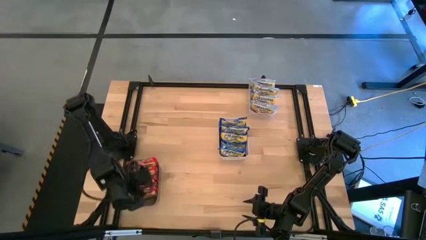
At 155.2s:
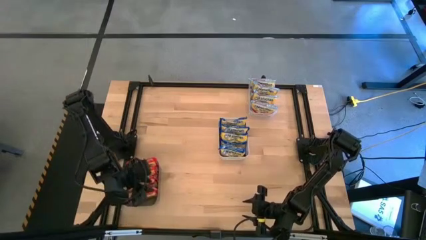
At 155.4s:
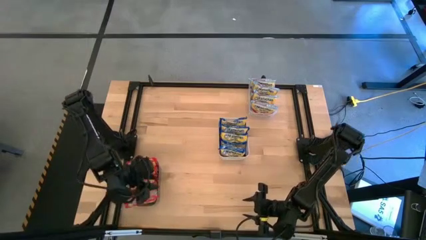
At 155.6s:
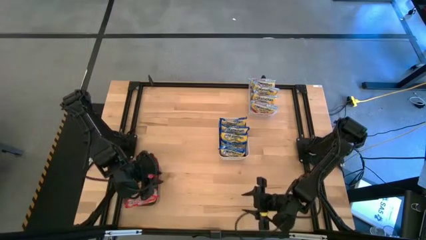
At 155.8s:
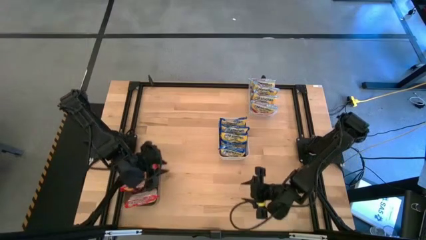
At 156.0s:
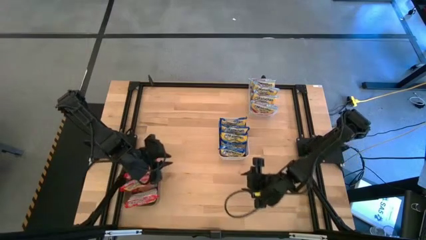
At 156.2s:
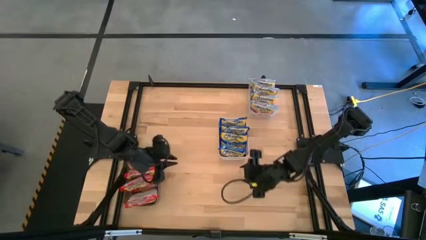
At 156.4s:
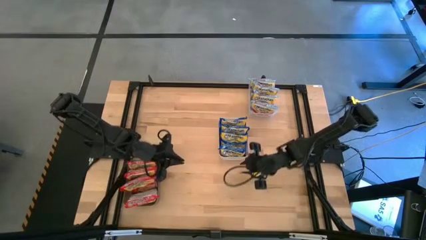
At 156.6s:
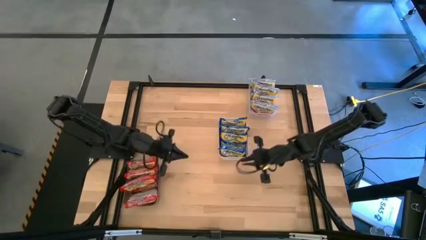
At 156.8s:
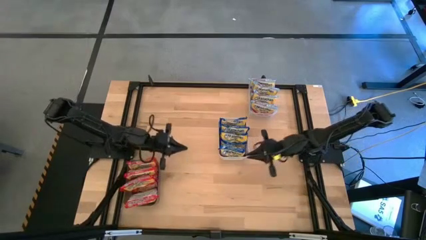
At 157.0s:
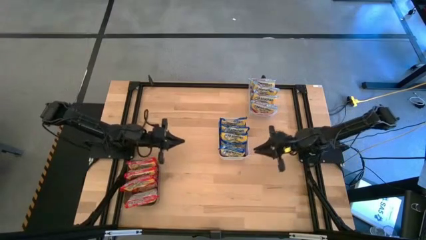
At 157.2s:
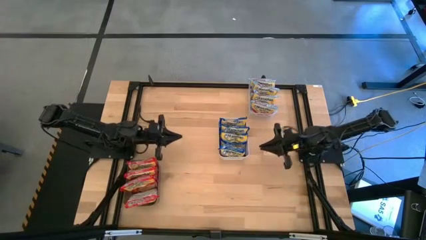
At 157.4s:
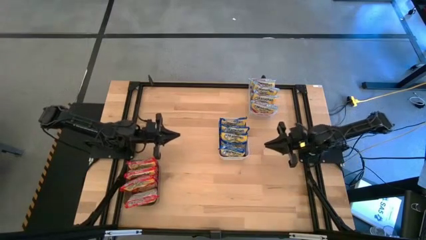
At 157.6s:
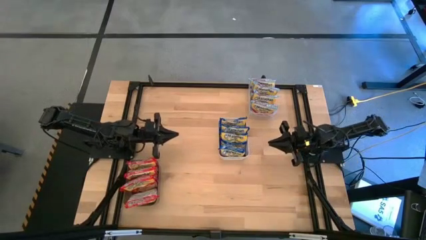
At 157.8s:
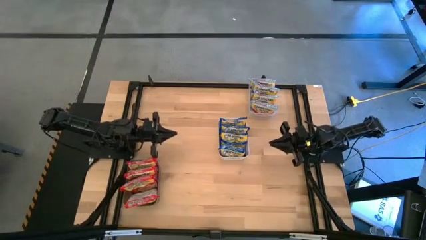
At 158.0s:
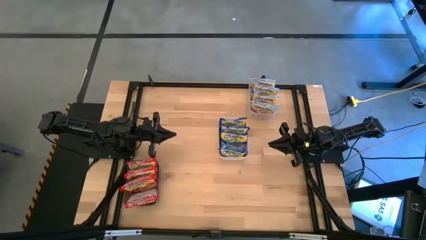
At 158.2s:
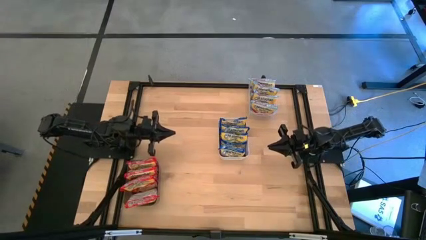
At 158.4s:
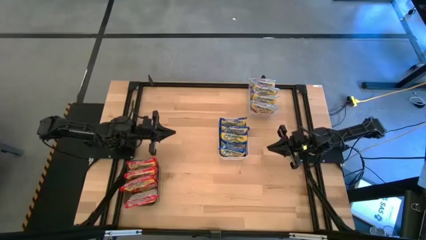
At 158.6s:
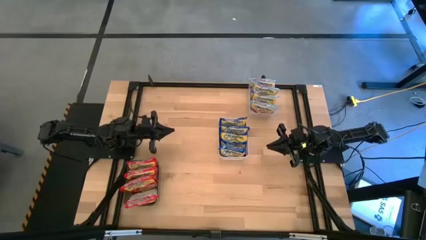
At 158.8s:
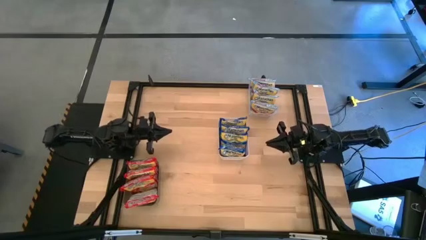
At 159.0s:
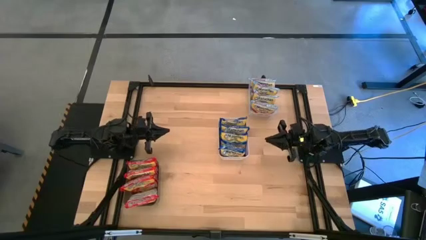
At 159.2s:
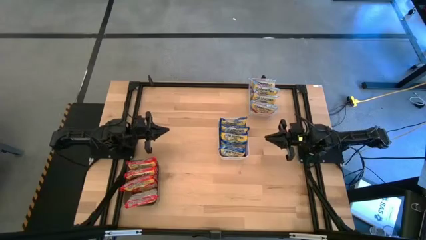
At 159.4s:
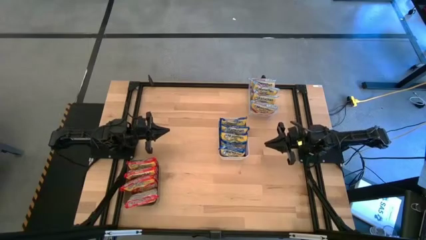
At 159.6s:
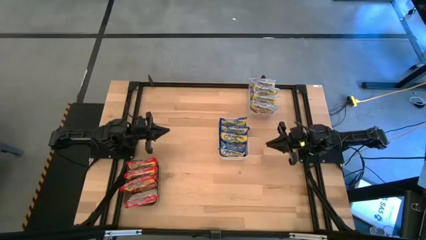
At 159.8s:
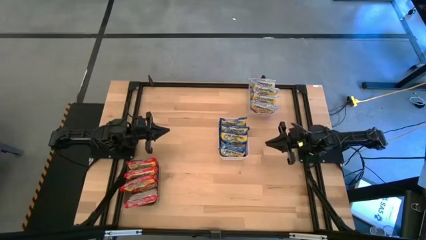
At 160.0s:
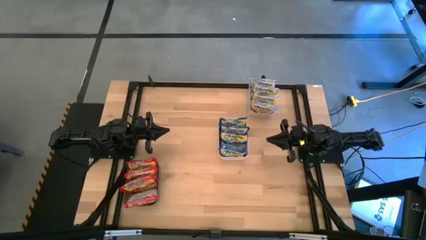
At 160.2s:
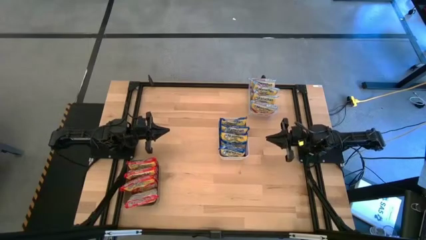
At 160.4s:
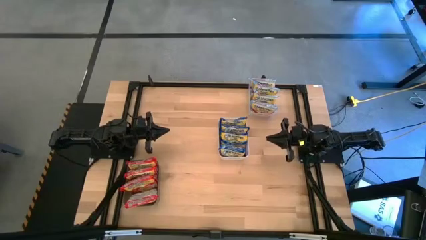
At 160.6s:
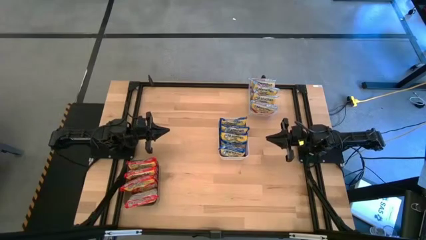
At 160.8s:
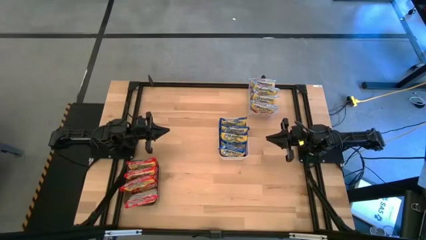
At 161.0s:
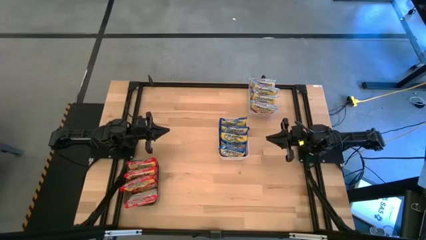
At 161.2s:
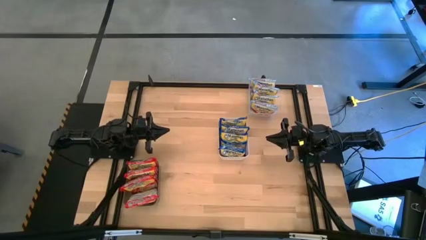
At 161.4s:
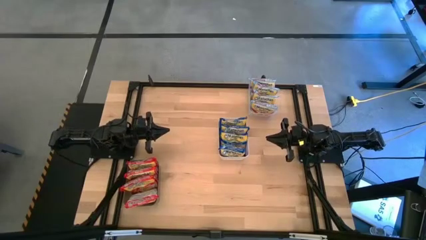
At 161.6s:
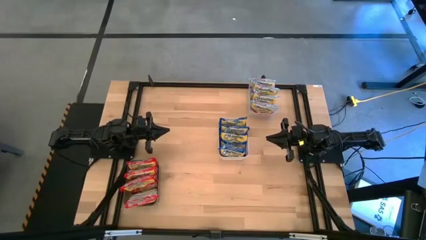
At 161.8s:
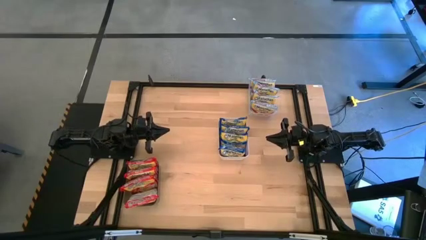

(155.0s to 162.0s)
Task: Sort Maruchan noodles
Return to Home Position

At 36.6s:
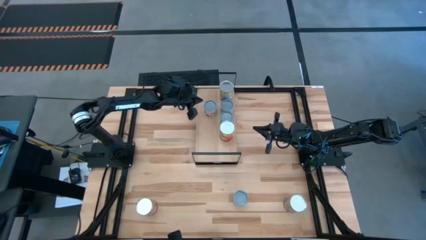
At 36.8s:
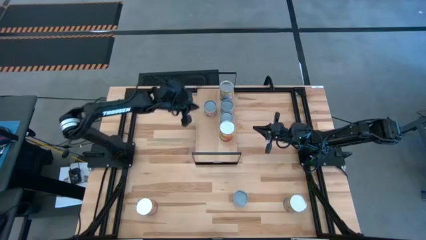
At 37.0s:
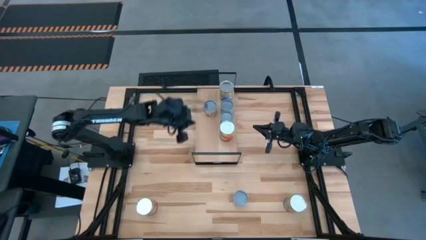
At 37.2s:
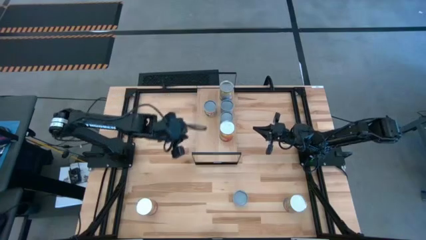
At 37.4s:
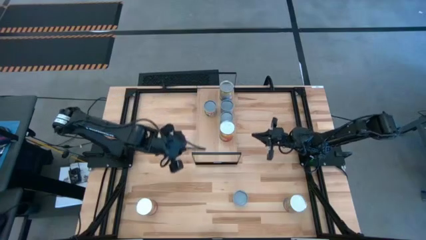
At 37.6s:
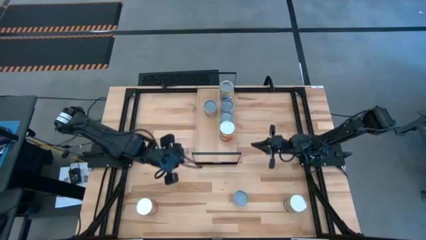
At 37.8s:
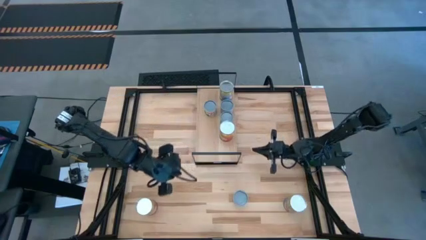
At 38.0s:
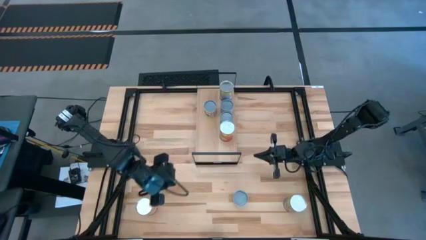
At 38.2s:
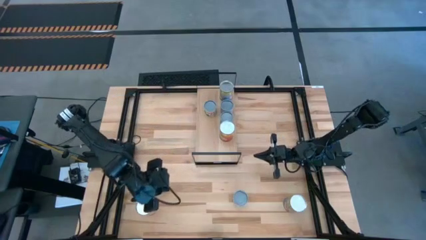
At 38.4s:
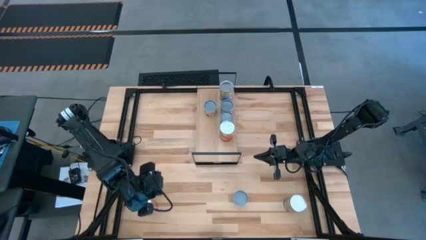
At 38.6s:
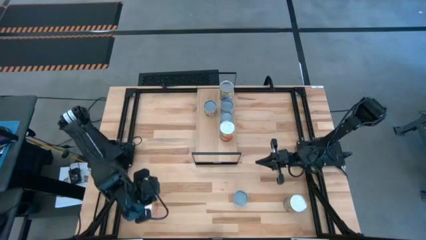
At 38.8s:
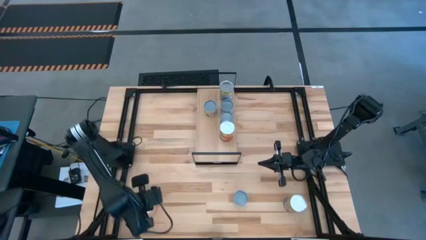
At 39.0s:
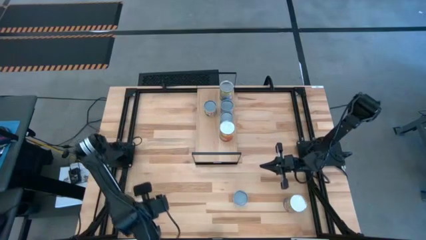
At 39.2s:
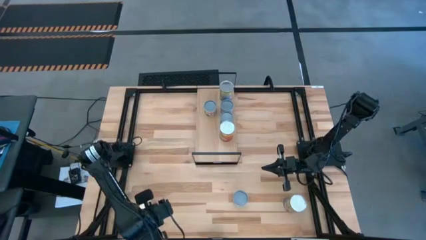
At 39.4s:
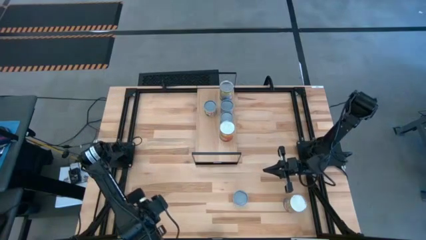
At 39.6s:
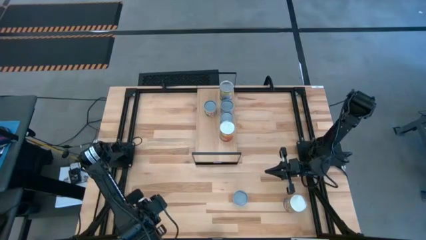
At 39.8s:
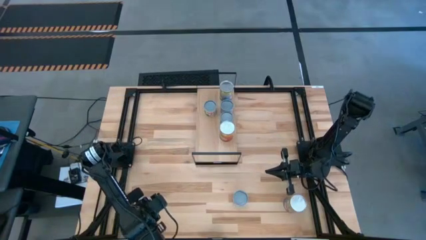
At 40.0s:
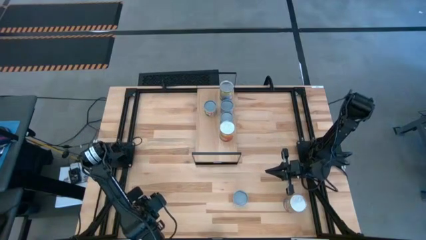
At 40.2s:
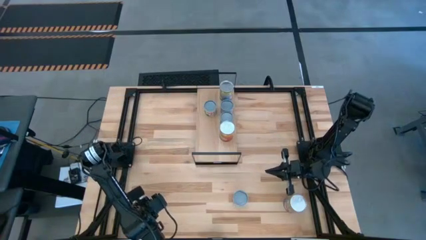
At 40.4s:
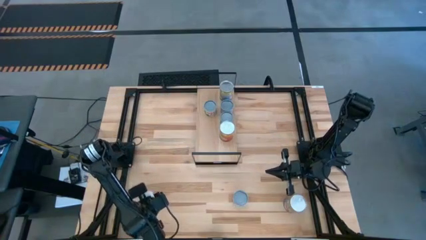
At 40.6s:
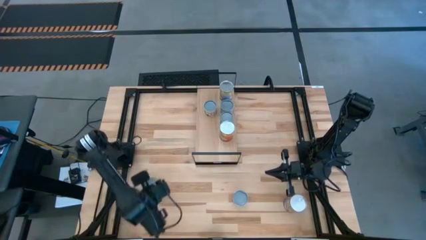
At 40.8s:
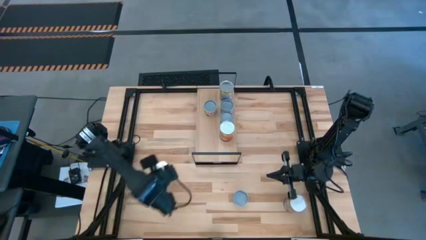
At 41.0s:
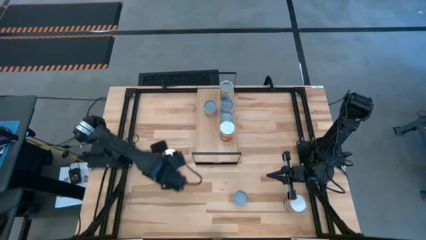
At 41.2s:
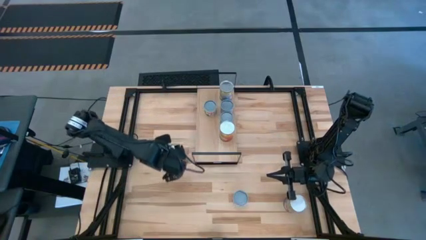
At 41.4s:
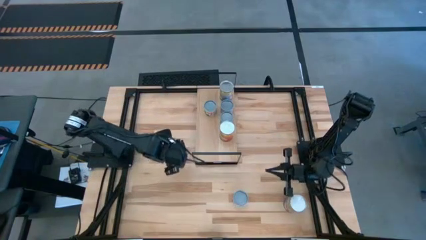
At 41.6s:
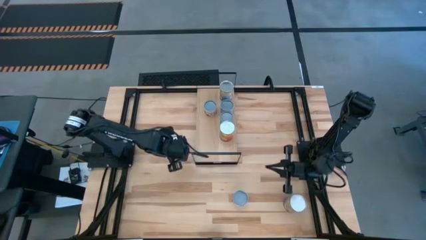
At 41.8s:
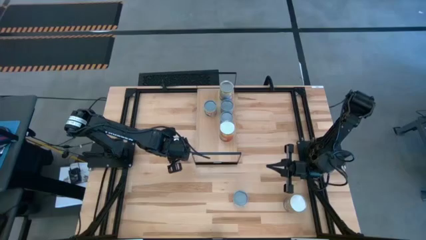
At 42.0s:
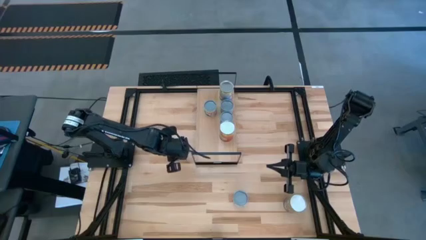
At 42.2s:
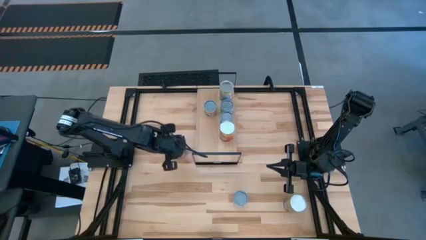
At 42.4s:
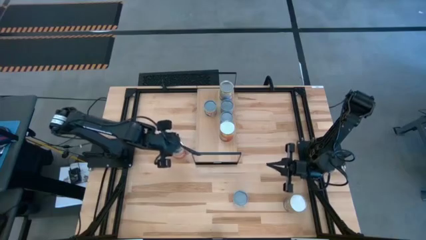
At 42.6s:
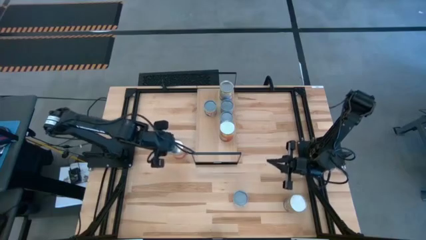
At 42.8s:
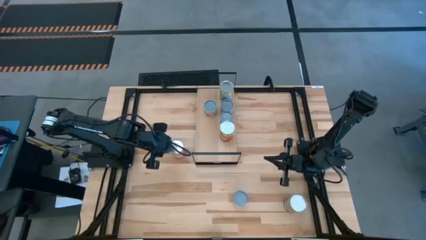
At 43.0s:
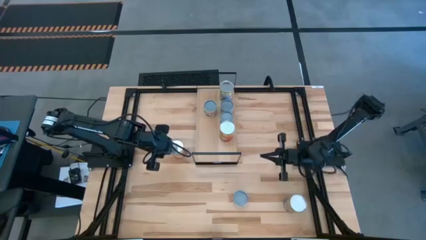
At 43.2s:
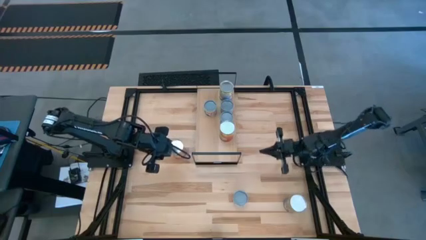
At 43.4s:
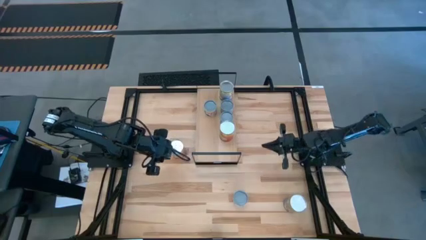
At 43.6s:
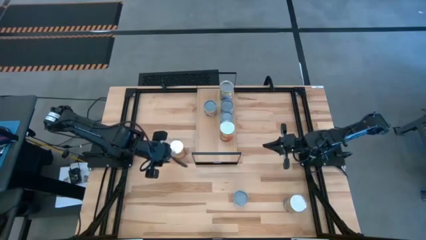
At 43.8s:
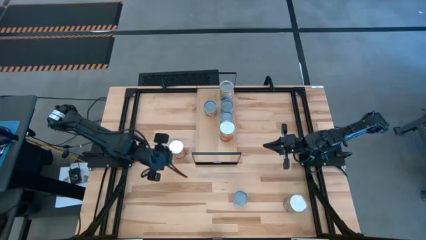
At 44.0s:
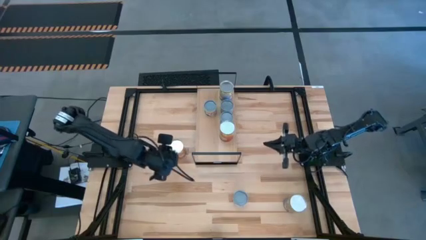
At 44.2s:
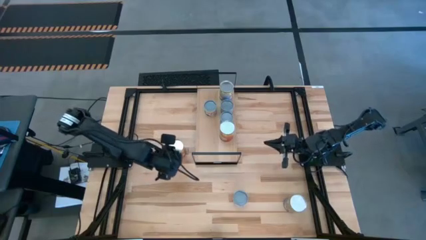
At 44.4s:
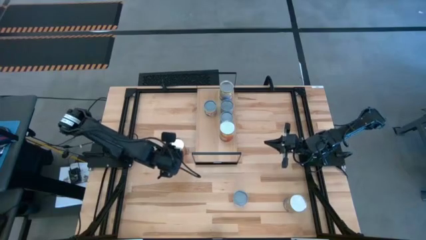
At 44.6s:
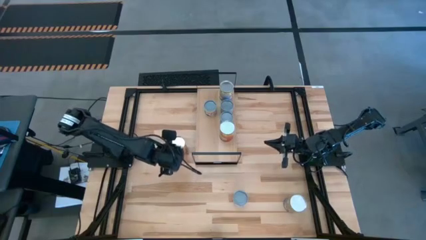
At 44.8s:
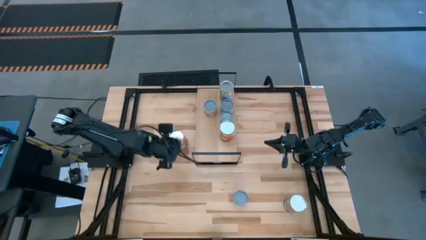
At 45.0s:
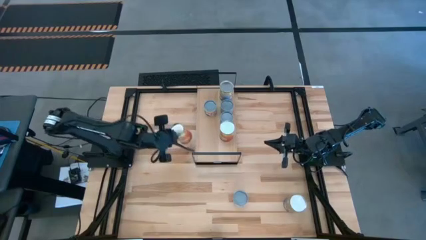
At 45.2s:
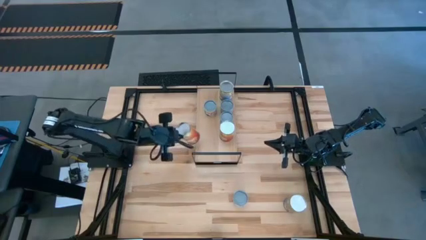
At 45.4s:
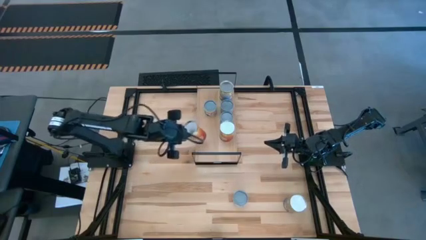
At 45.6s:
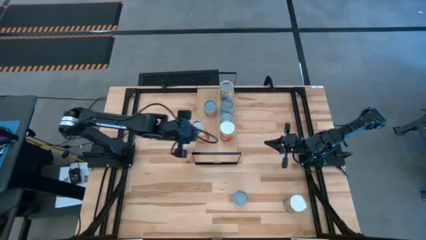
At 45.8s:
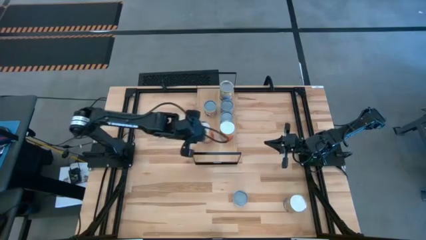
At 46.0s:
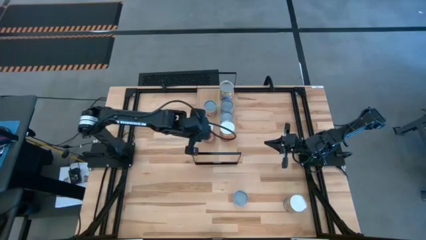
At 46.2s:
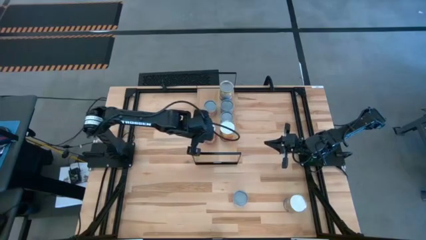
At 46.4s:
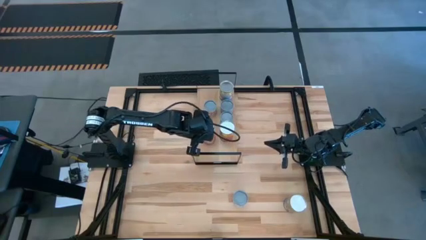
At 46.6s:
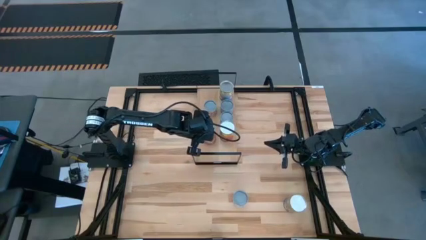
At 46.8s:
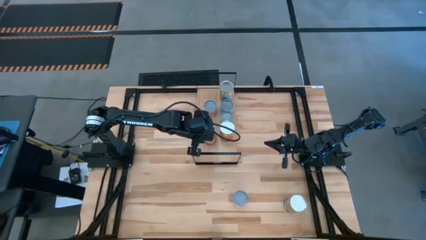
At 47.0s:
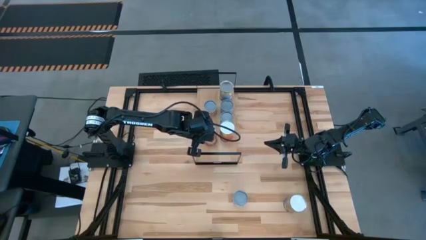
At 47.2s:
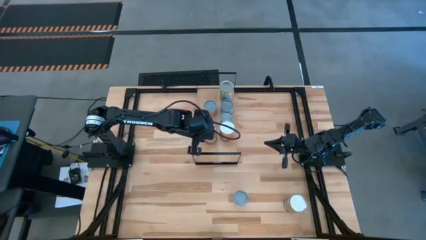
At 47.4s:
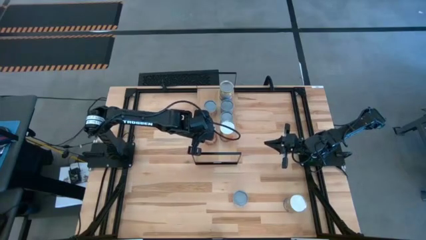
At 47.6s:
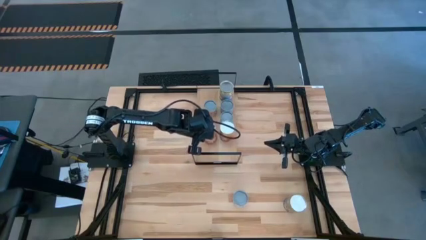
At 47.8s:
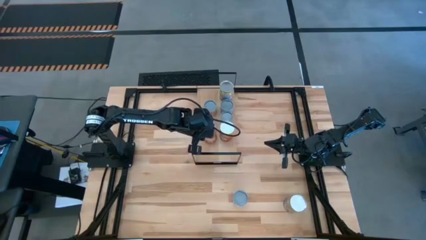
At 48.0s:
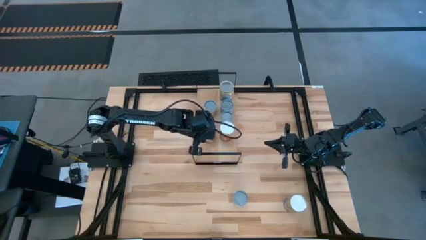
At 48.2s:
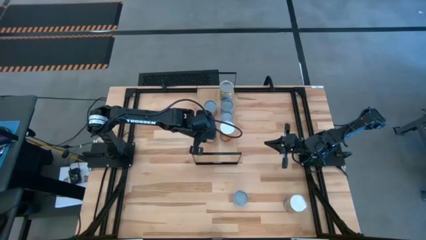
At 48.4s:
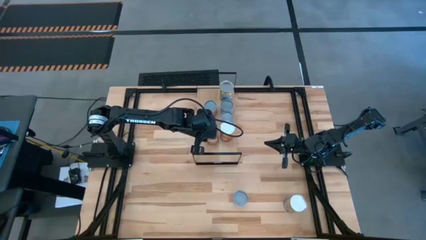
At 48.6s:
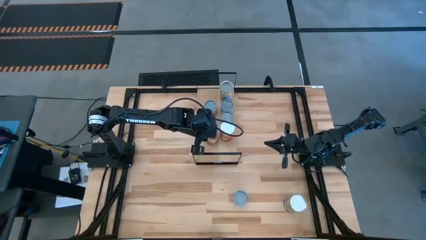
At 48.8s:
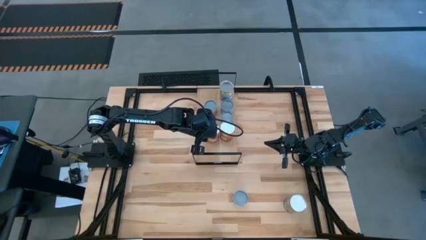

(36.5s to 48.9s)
Task: Pick and place cans onto a shelf
Put the corn can on the shelf and align it with other corn cans
